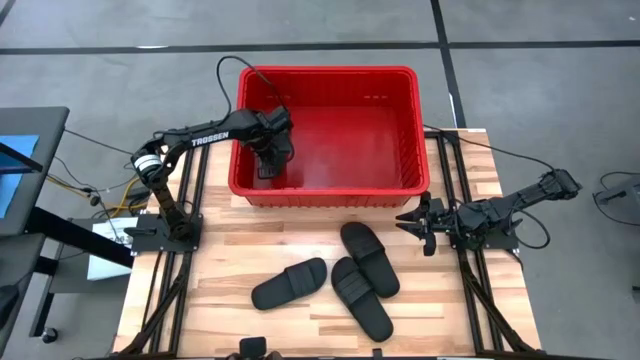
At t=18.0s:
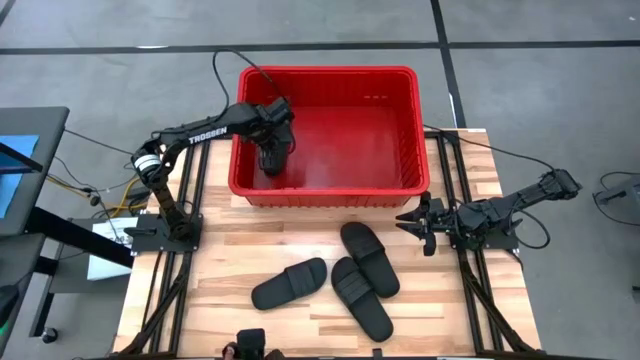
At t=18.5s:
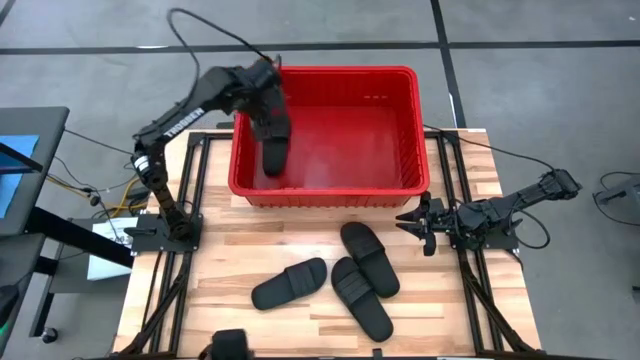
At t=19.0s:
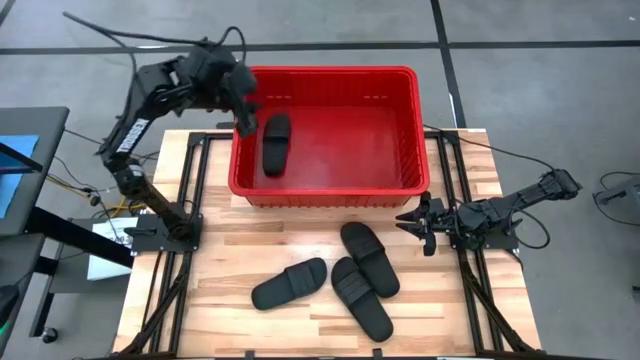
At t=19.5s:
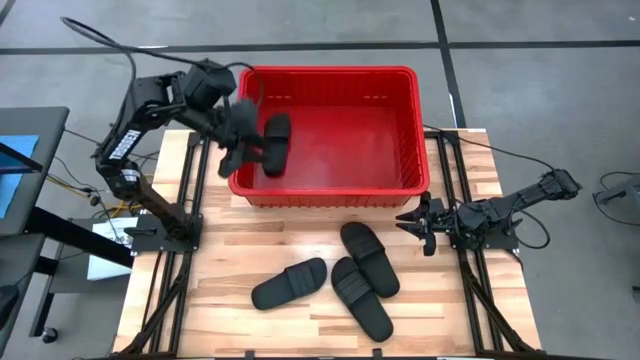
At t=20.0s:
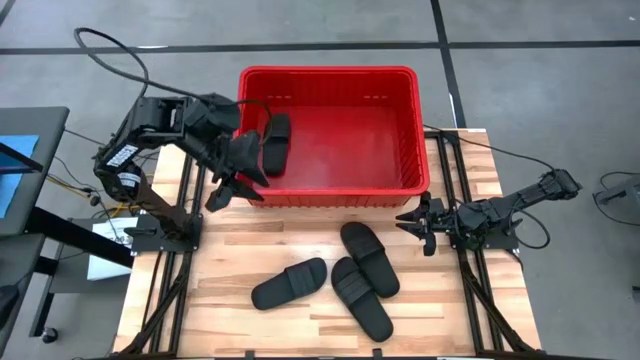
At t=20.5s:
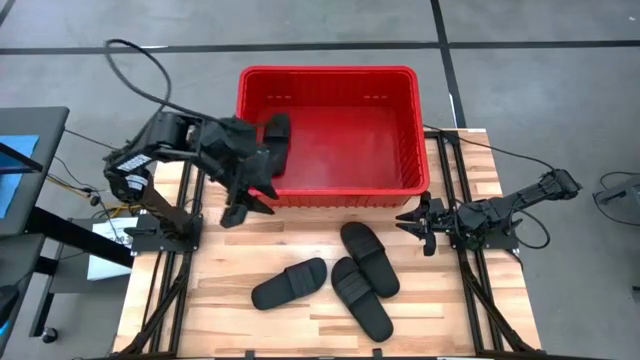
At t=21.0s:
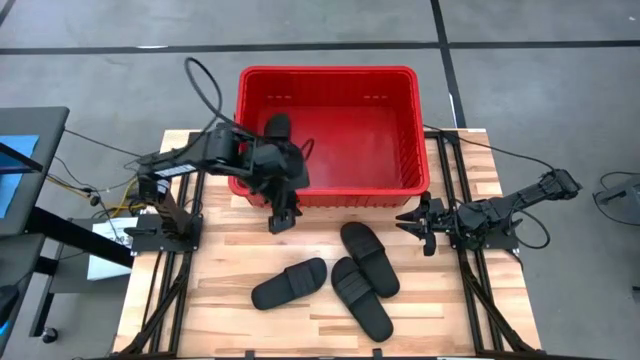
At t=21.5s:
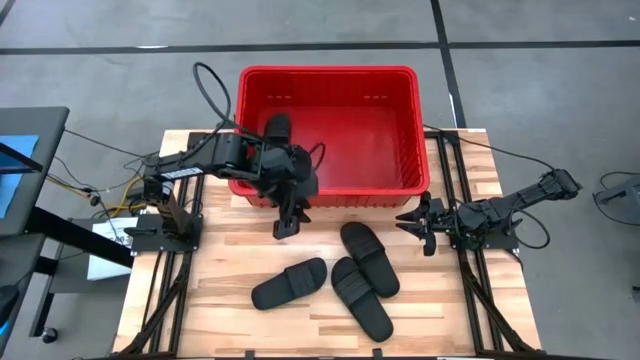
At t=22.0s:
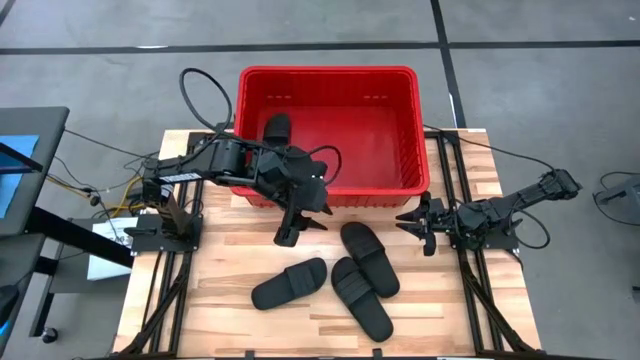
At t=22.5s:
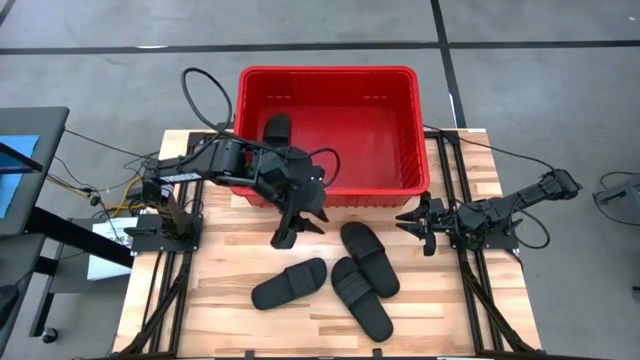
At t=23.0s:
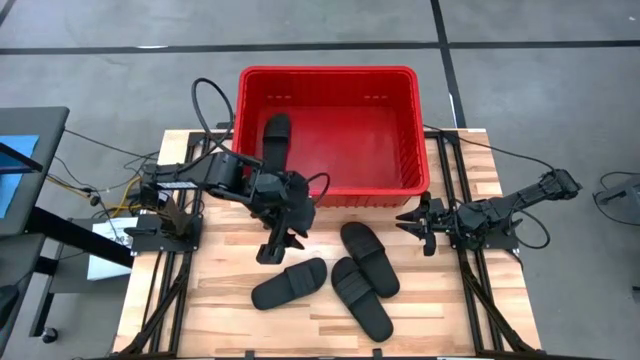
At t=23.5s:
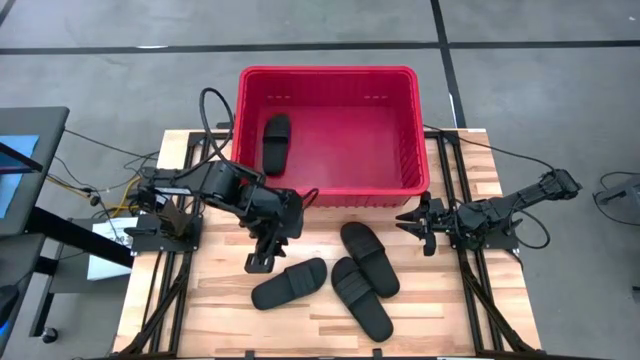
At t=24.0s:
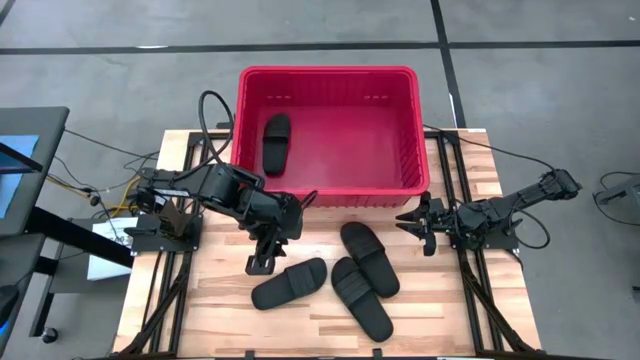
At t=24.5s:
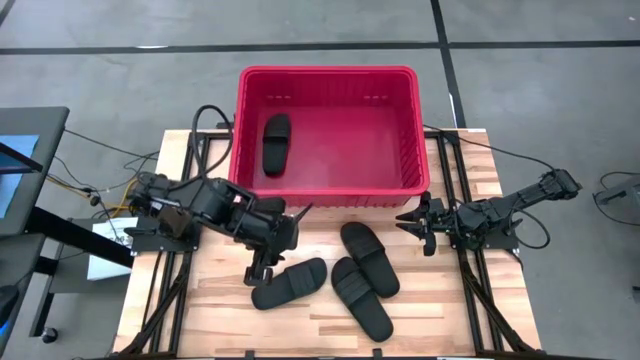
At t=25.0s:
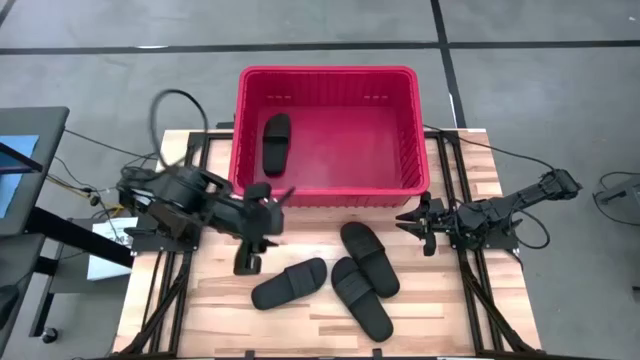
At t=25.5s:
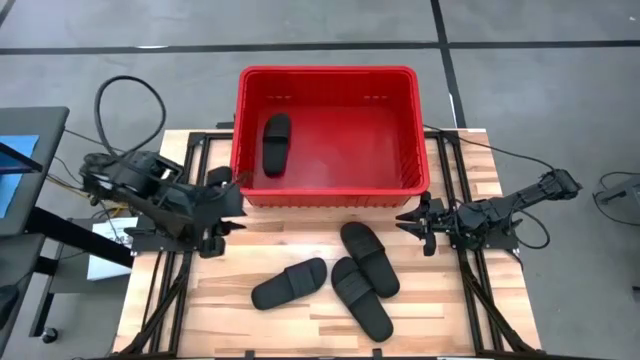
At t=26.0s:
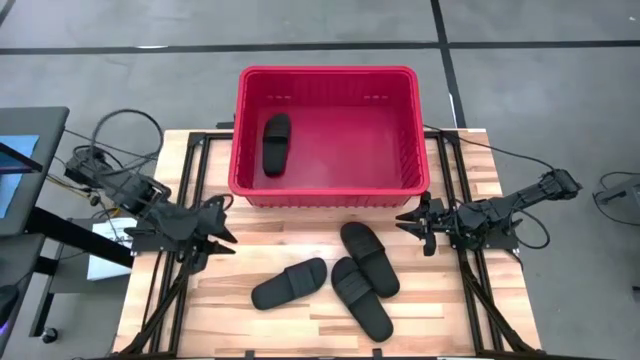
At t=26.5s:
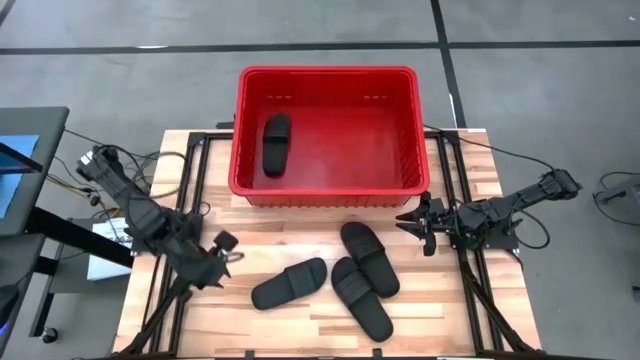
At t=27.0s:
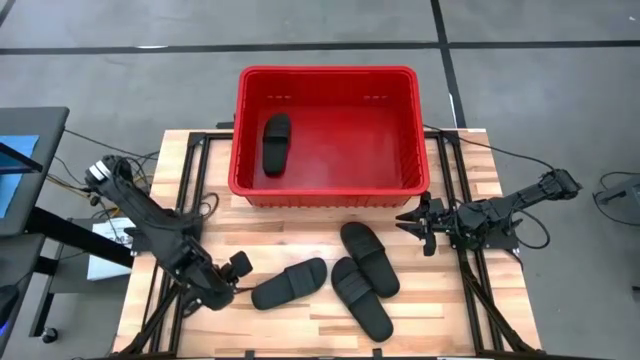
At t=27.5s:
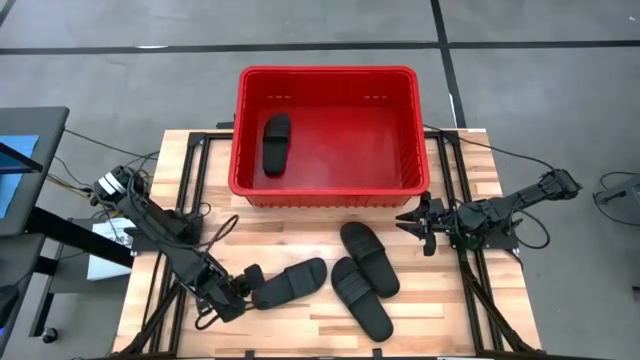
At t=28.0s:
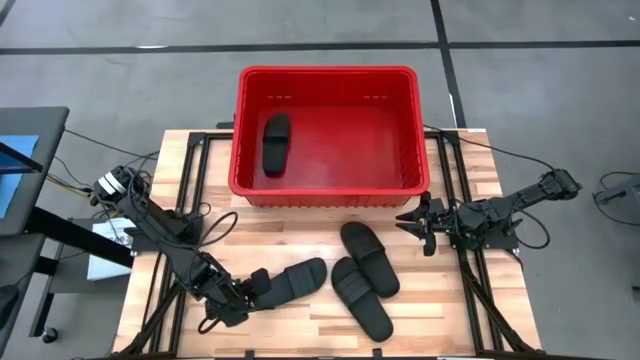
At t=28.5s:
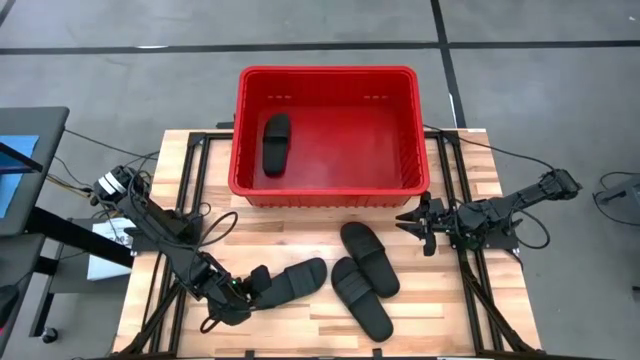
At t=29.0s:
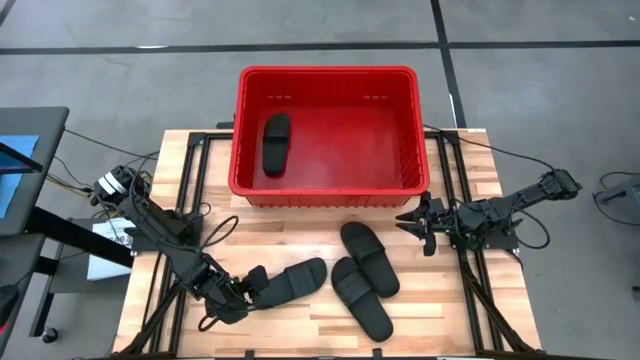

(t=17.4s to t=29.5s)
Task: Pick and place slides into bin
Put the black slide into the red organizer bin

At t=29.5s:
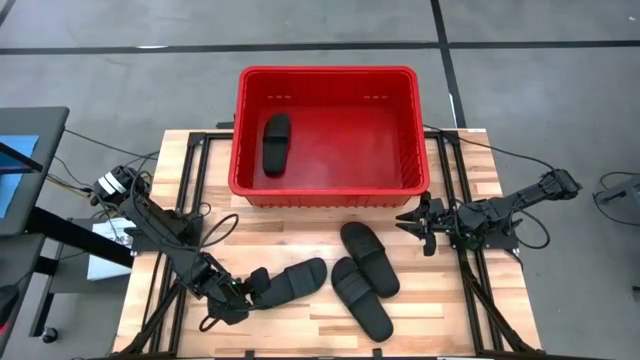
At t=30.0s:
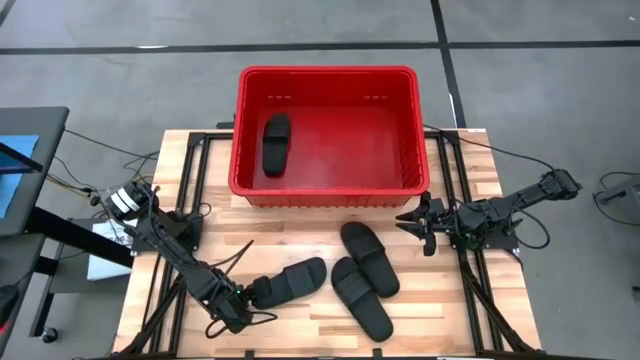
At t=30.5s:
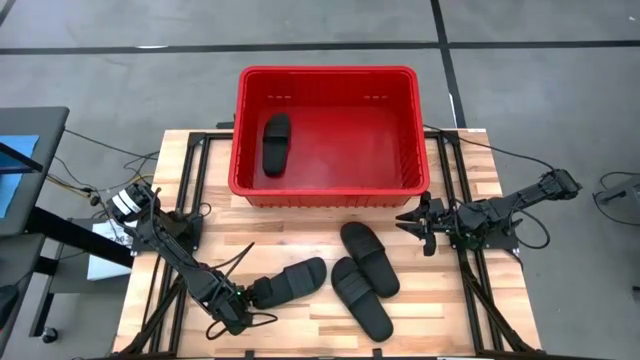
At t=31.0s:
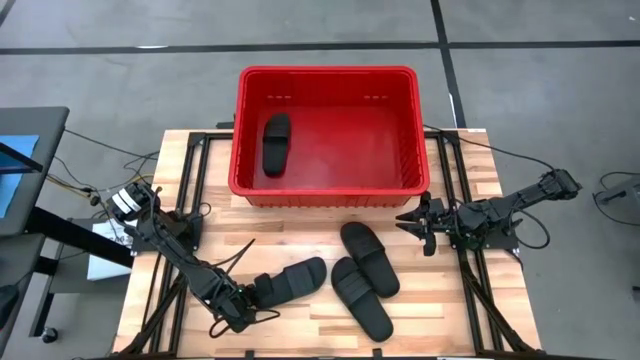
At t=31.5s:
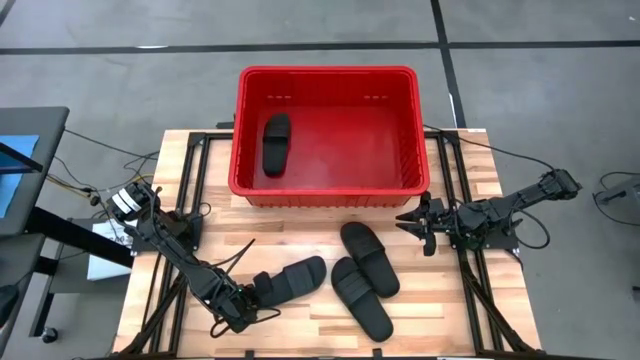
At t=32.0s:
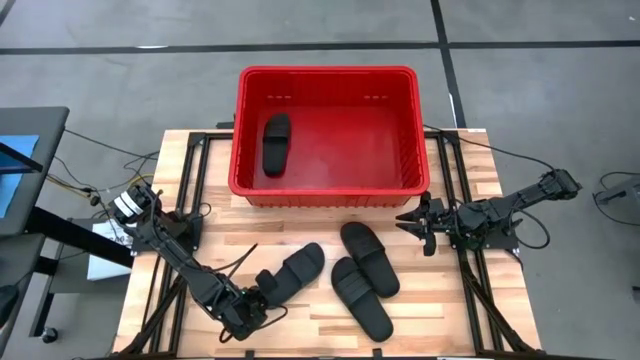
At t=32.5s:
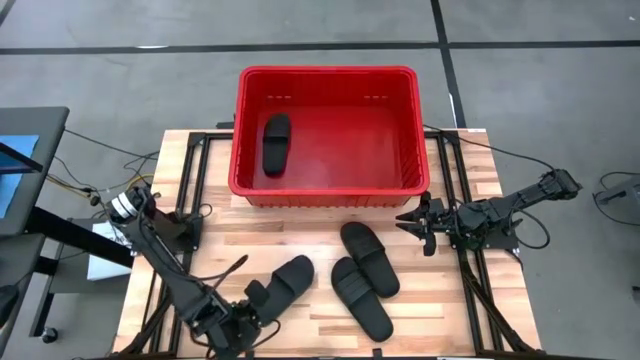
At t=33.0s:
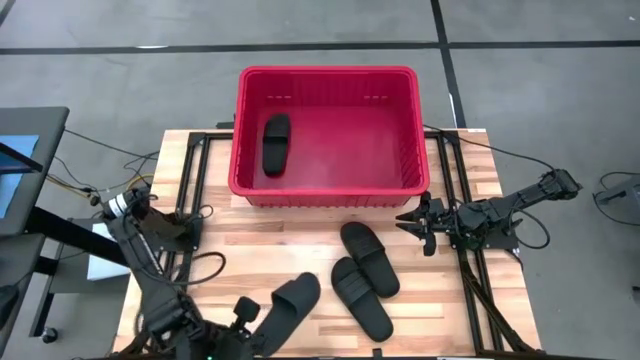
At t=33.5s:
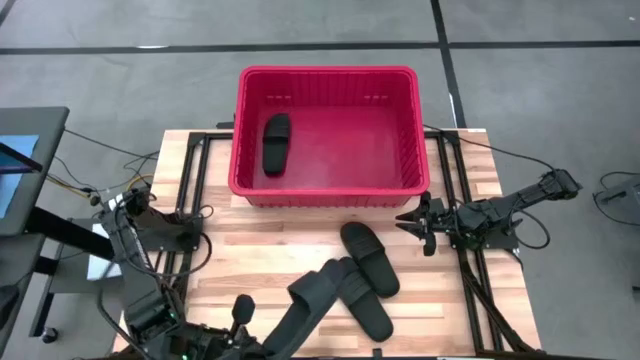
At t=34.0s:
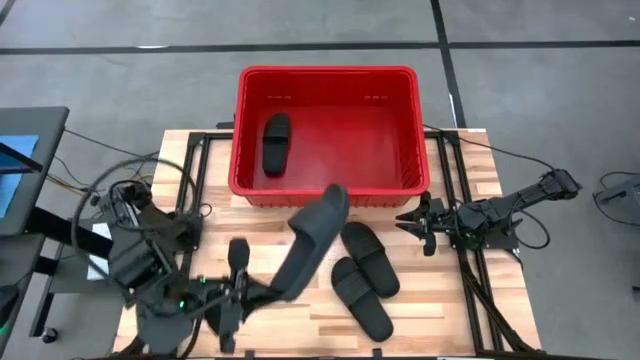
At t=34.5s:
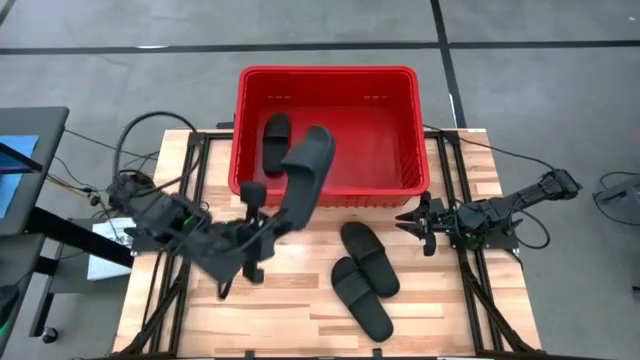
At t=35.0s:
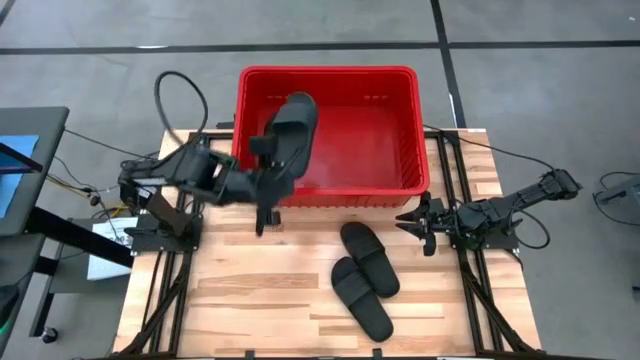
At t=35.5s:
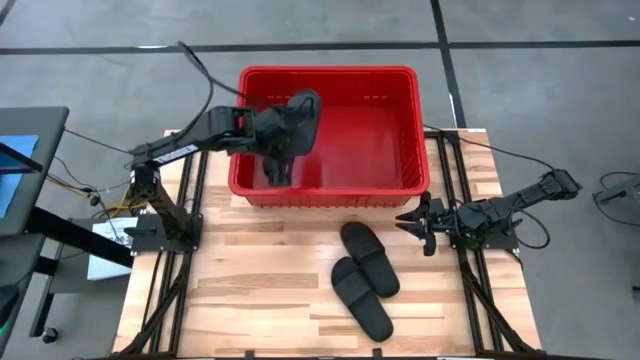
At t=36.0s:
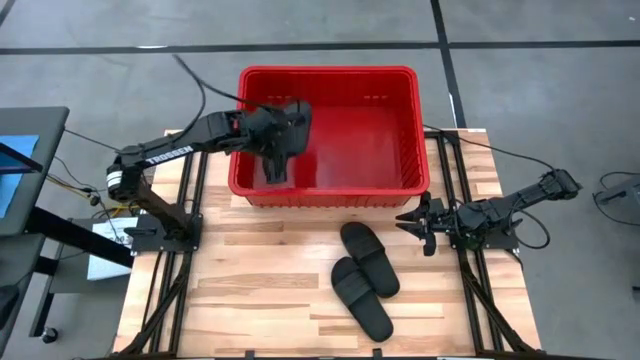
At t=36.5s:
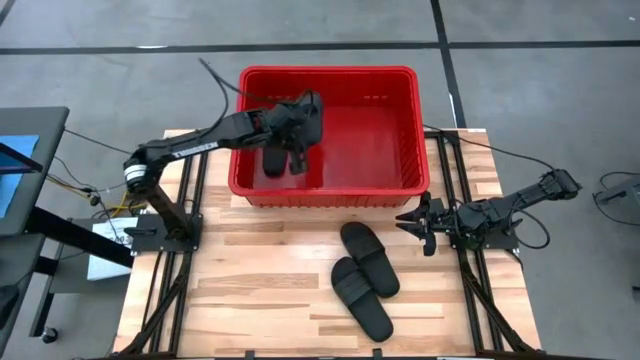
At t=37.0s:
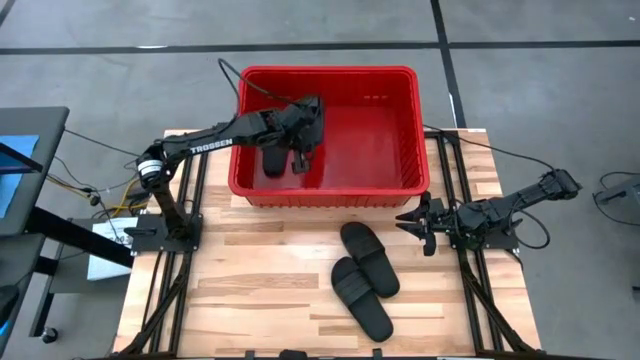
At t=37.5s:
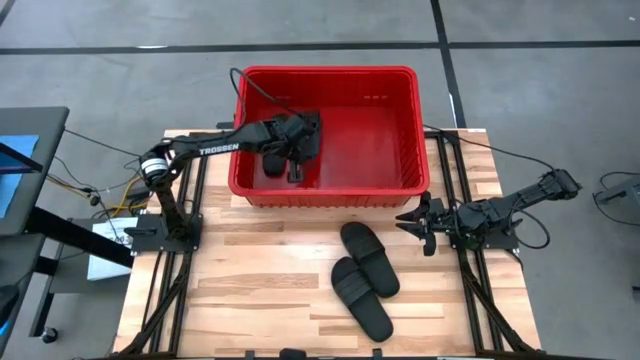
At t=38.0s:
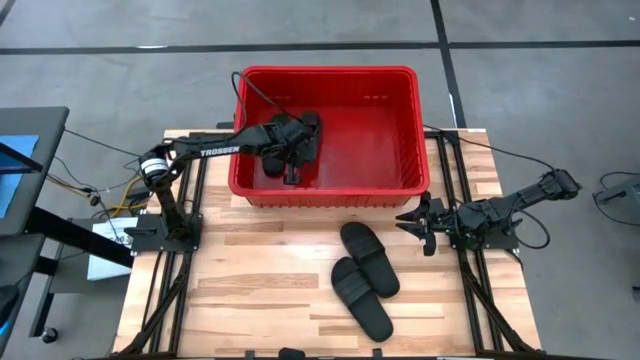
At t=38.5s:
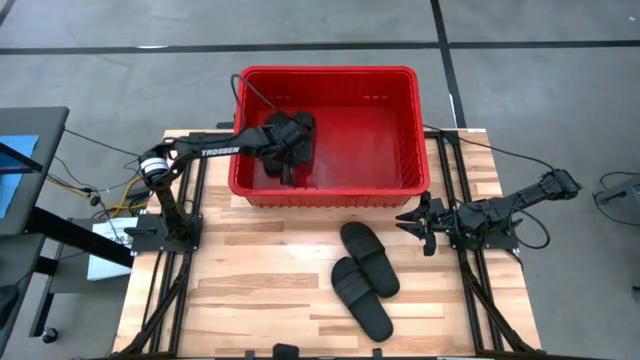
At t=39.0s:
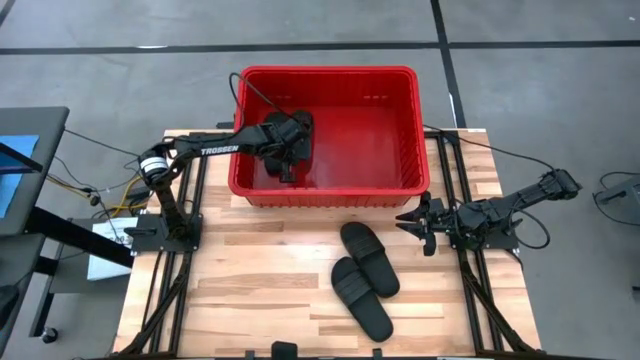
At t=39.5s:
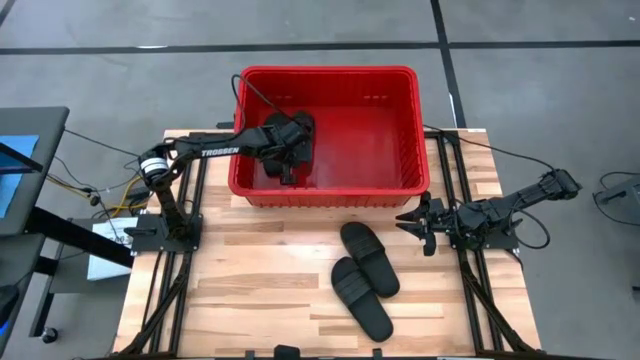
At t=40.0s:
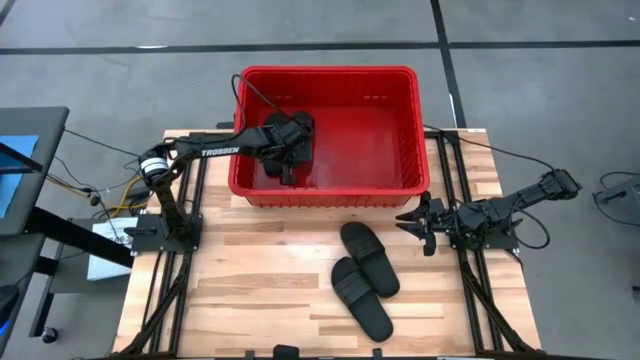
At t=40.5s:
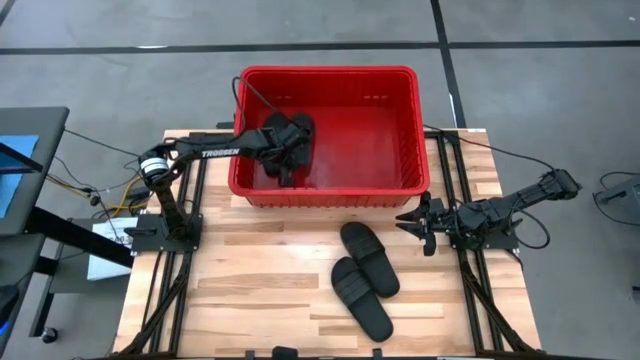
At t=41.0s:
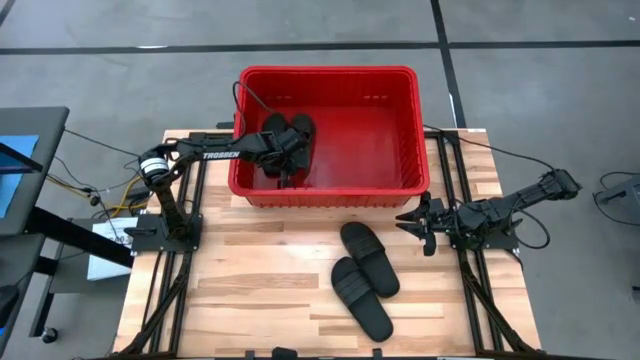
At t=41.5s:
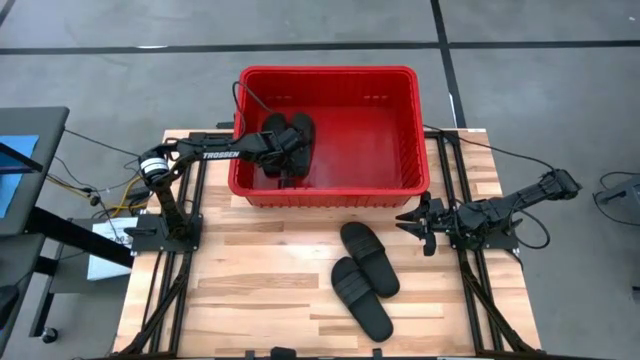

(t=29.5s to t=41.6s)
Put the black slide into the red organizer bin
